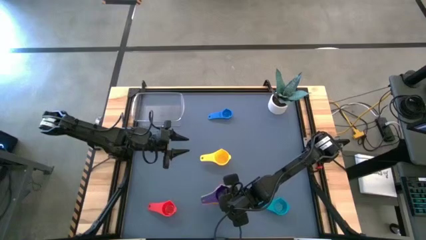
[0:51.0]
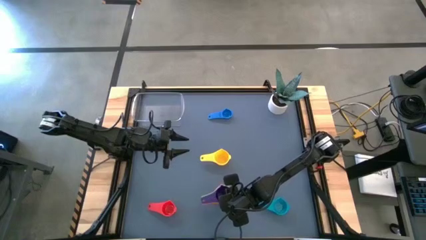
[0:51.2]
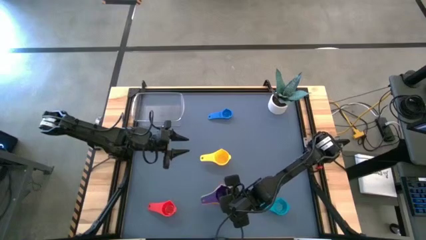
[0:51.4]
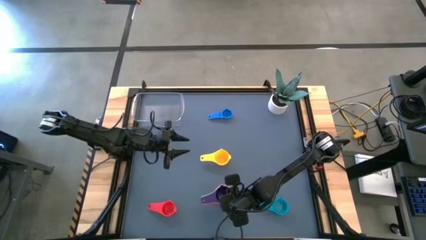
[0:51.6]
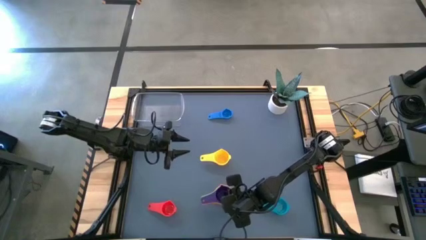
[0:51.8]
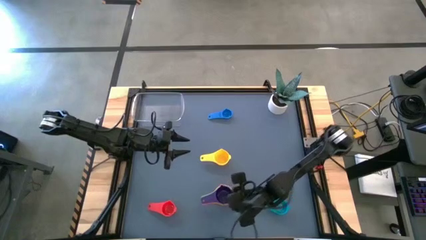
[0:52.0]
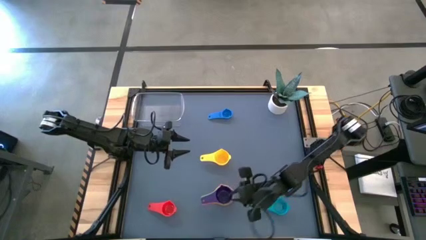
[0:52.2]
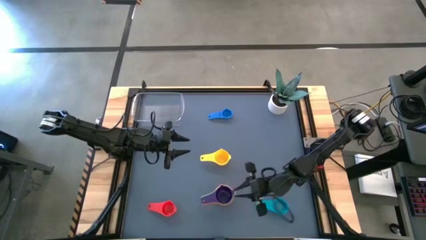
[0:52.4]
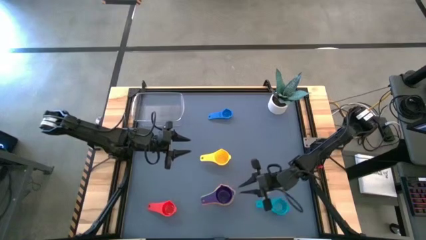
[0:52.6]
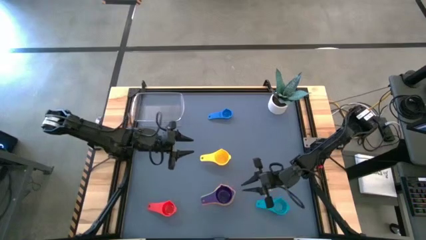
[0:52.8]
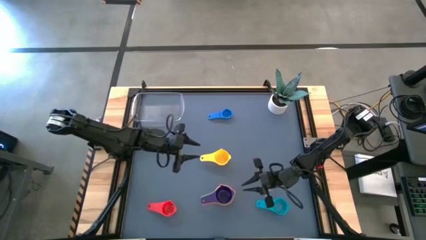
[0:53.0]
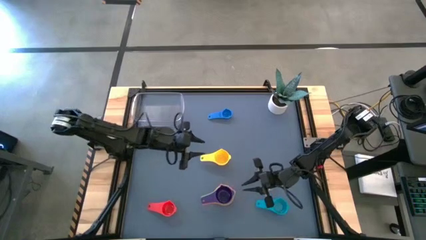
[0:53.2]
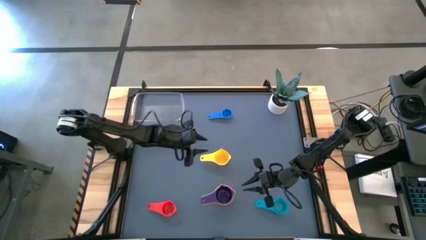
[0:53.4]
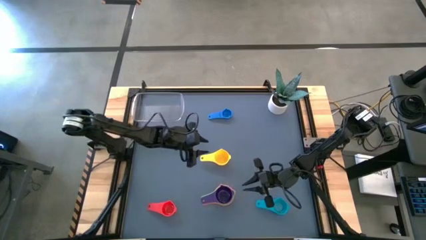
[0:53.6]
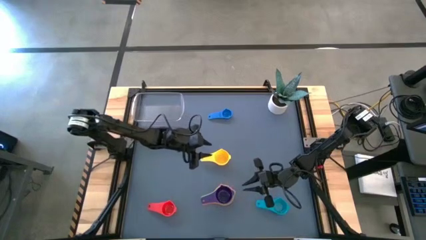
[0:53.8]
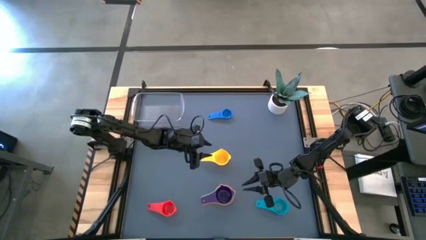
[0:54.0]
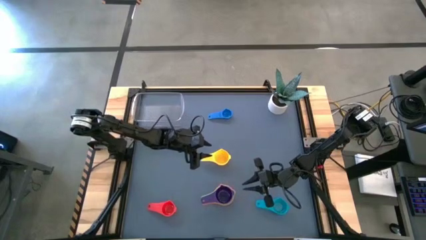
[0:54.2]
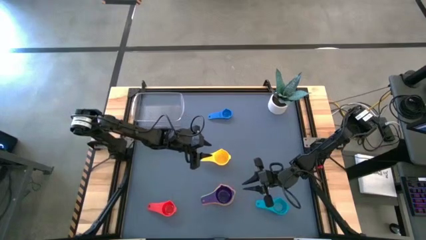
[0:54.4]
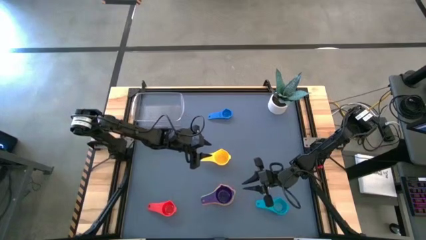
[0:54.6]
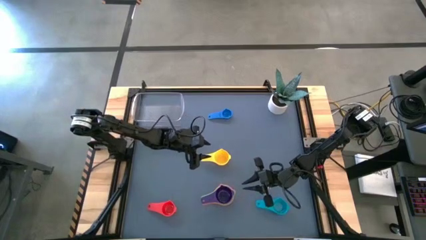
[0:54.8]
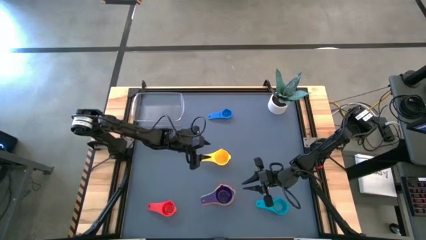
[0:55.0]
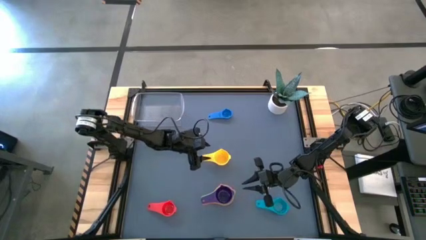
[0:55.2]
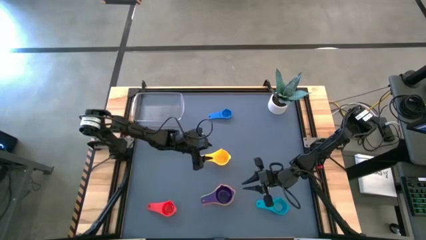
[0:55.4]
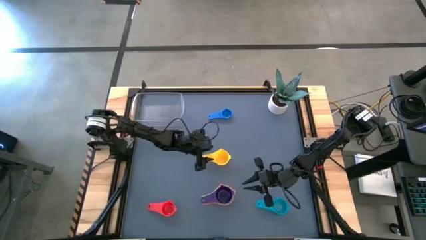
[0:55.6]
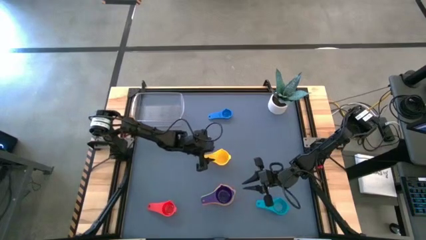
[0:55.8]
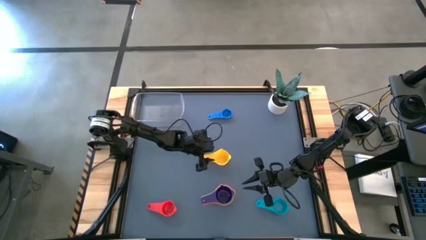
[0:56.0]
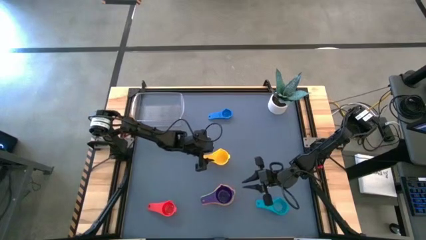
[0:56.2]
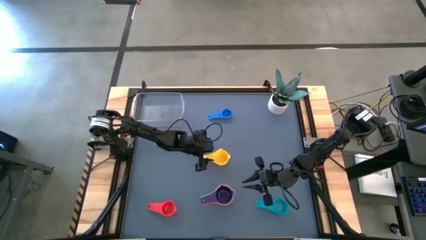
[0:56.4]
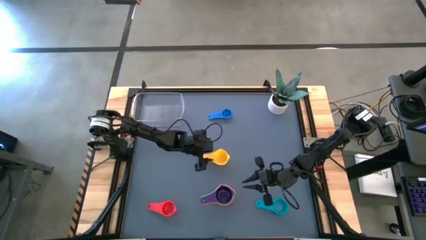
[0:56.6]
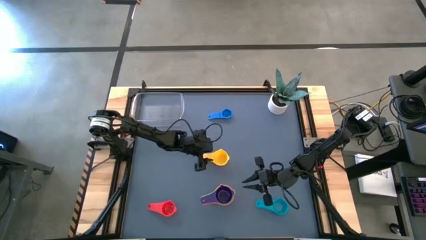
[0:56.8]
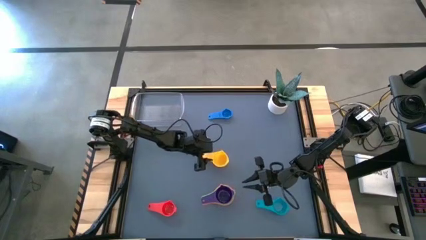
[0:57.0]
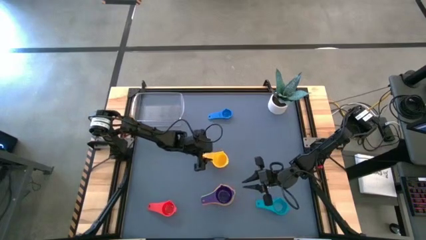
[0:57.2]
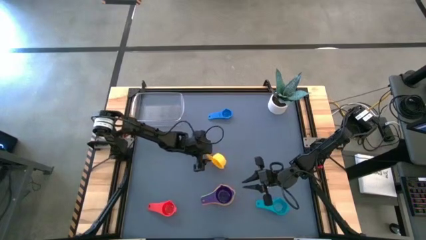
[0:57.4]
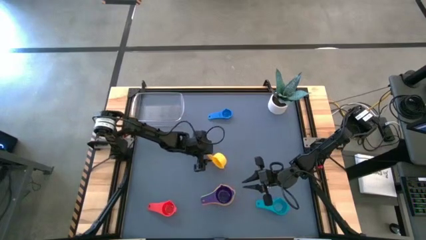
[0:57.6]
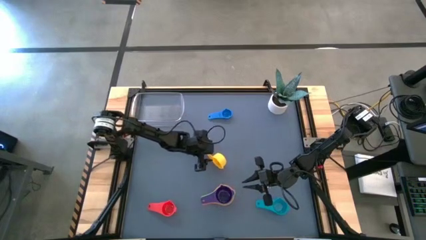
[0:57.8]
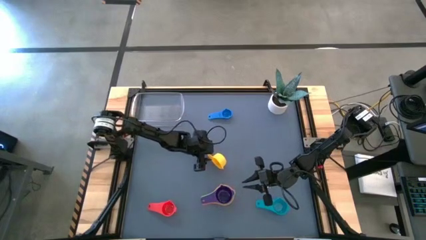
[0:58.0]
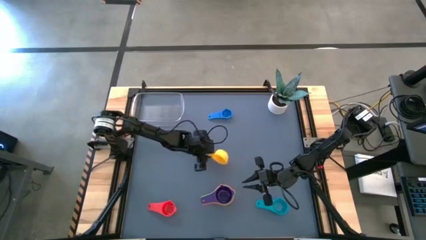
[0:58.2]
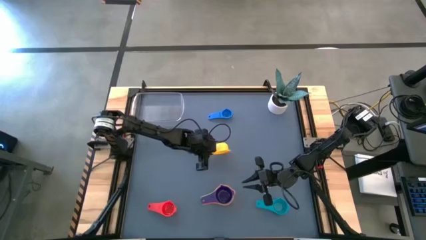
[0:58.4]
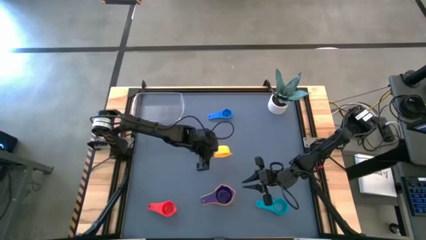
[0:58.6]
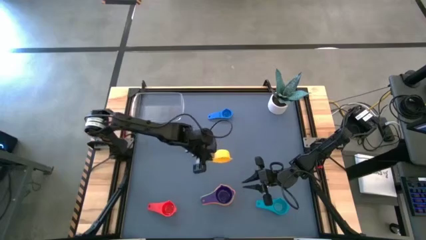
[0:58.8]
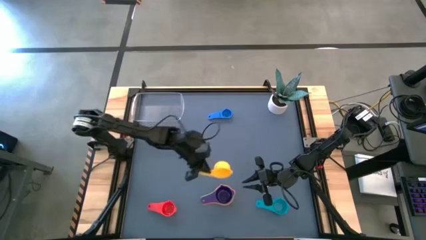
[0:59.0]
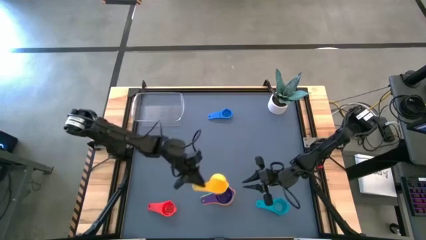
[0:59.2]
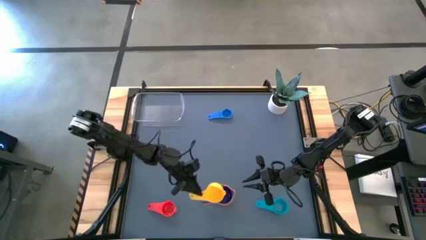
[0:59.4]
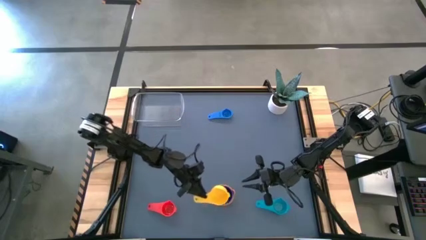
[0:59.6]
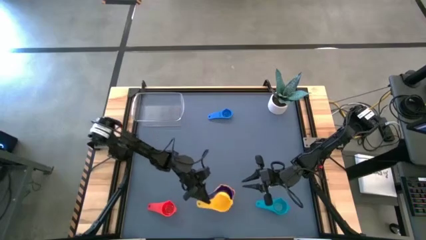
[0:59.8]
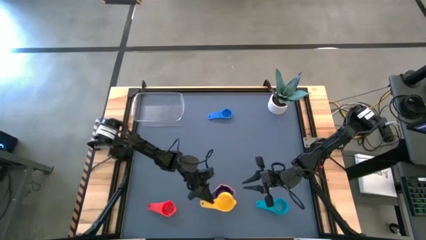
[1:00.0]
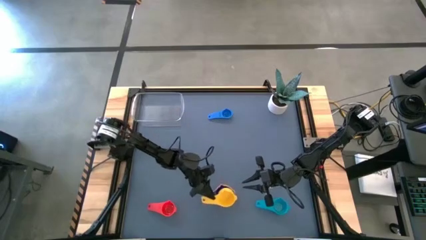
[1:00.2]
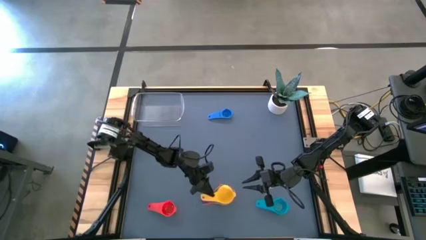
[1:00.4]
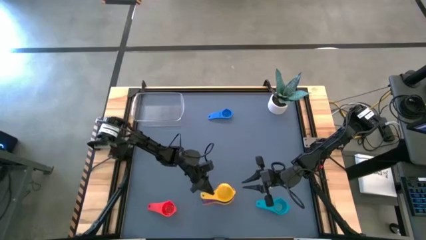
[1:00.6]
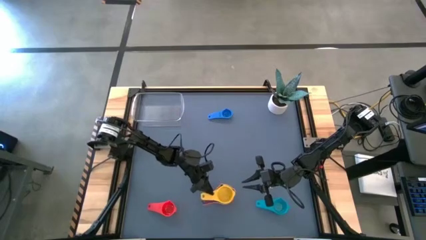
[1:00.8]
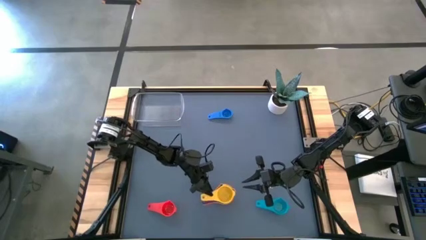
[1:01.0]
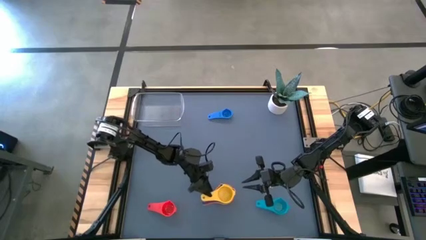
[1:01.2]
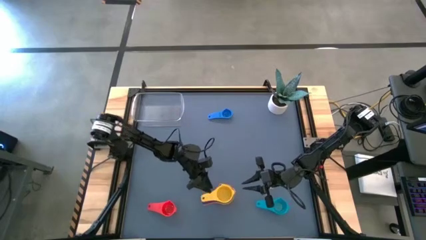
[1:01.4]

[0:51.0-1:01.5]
Task: Nest measuring cups in basket
Stack the yellow measuring cup on top of the violet measuring cup

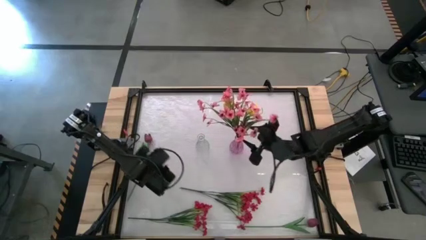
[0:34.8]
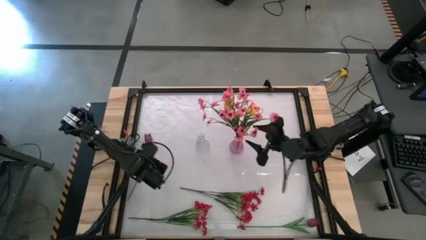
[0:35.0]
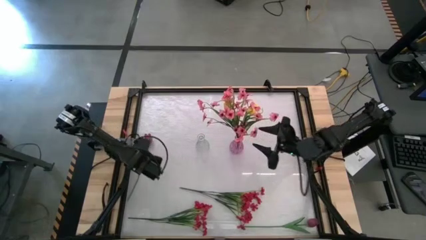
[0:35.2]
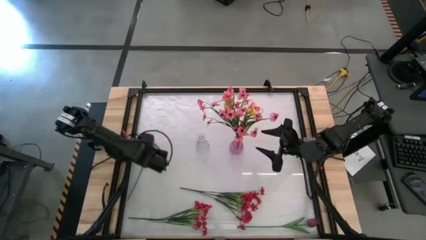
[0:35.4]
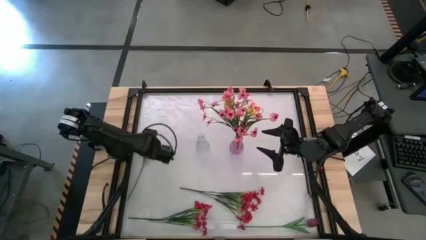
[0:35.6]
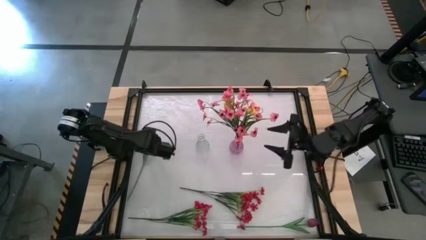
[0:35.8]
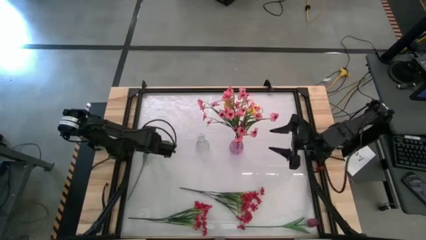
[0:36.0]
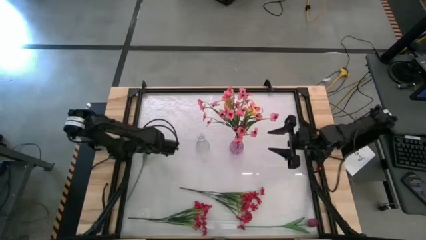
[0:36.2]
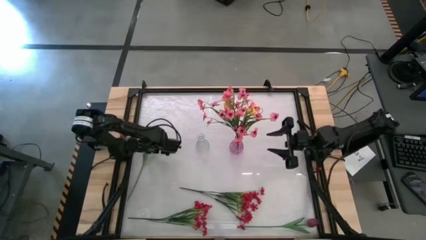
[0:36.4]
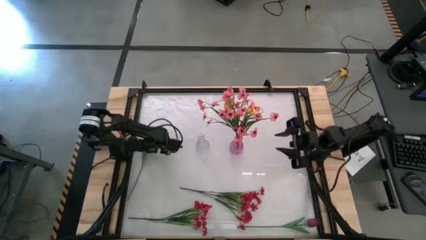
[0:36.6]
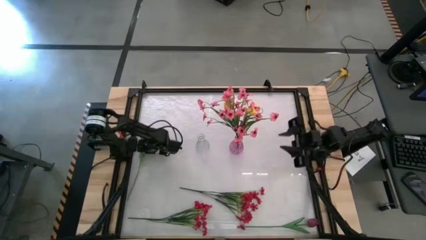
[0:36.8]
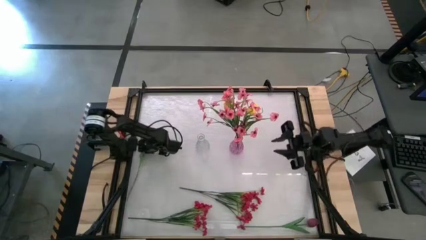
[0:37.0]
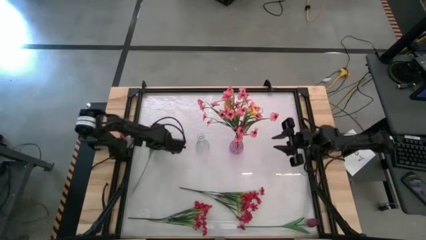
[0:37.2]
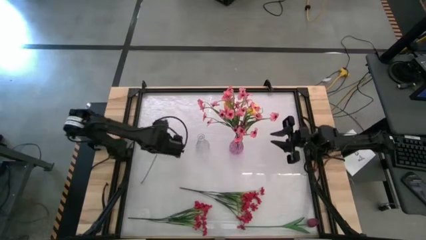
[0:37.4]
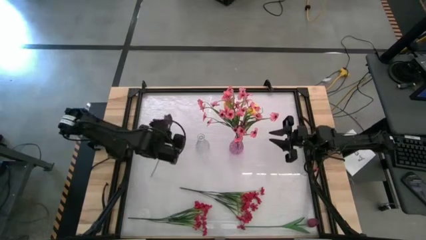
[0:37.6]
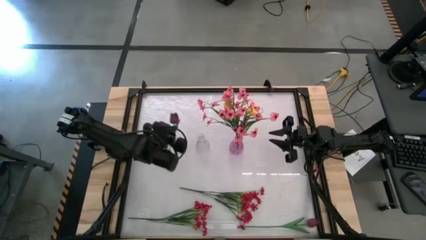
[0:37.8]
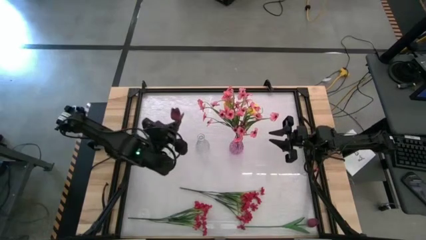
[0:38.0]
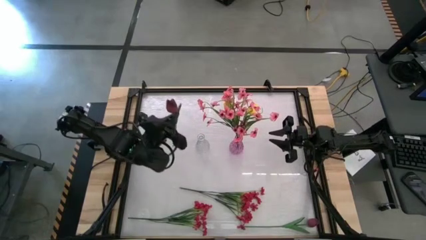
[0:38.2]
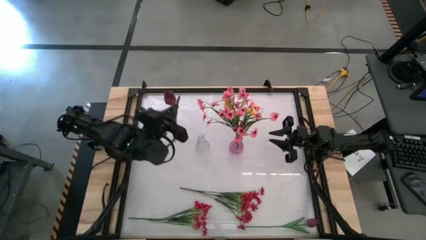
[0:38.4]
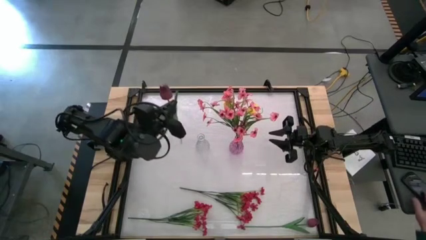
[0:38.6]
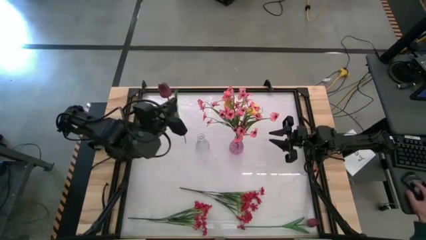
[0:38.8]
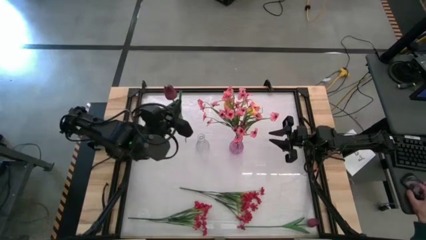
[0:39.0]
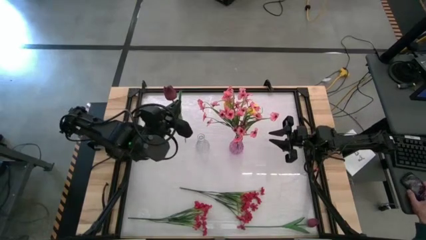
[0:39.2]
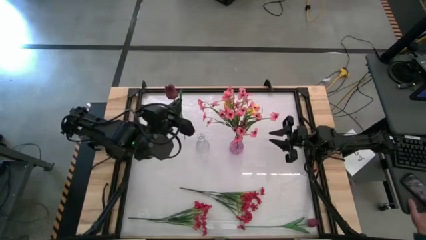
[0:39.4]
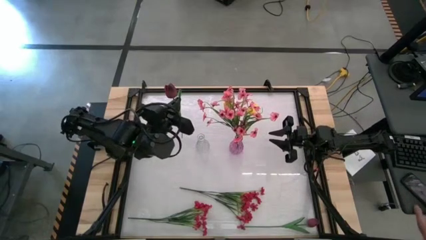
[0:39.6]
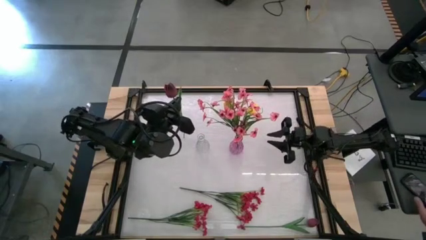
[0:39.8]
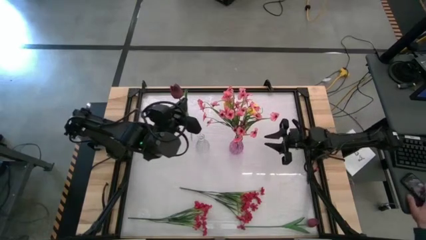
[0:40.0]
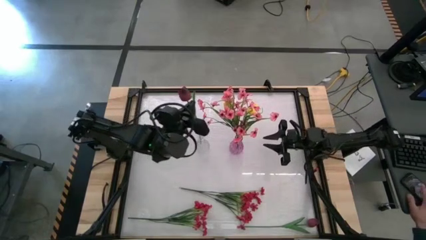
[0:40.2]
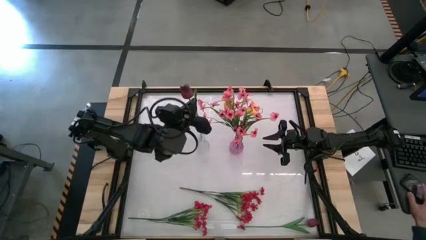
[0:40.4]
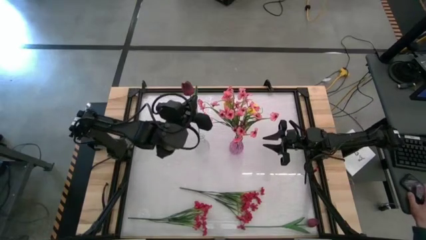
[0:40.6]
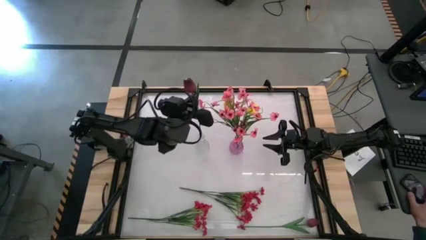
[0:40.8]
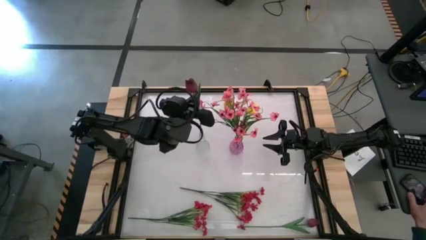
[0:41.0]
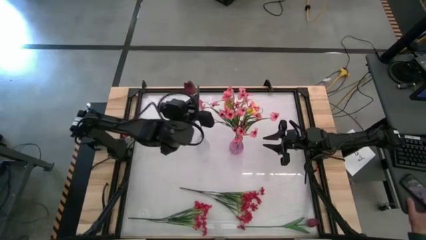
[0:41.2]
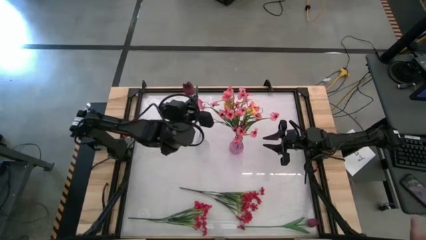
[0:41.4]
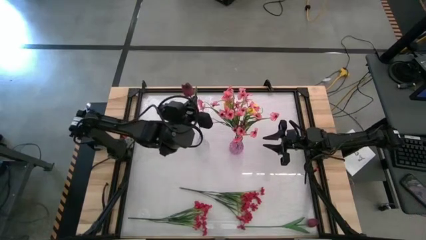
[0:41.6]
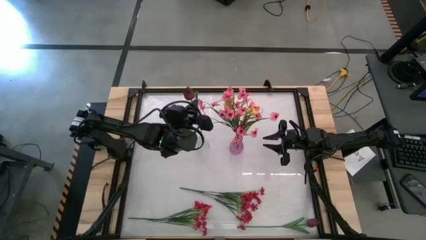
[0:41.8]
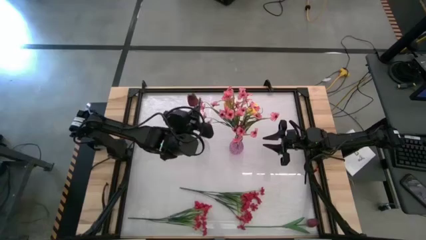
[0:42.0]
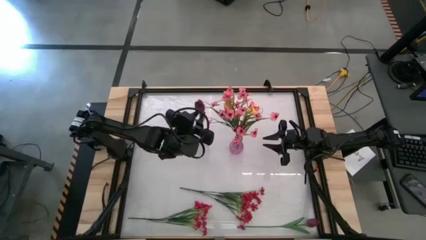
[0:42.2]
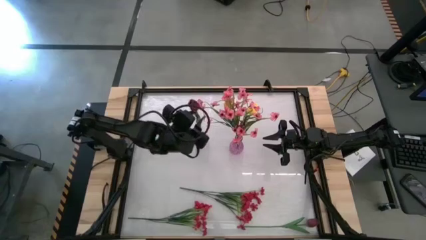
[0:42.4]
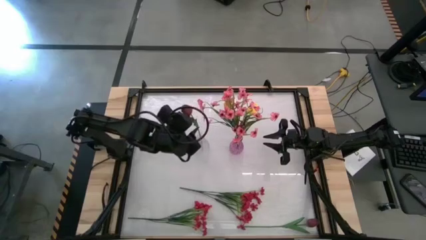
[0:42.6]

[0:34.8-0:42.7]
Task: Sort flowers into vase by color
Put the top dark red flower into the transparent vase
